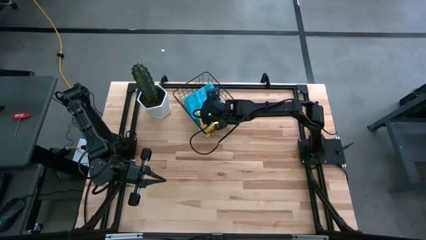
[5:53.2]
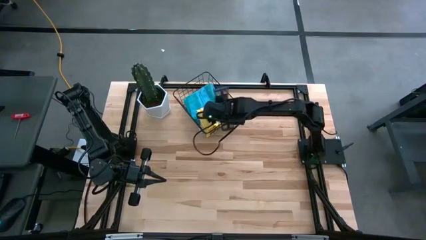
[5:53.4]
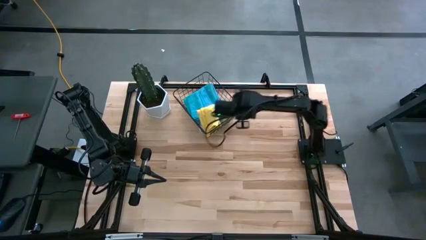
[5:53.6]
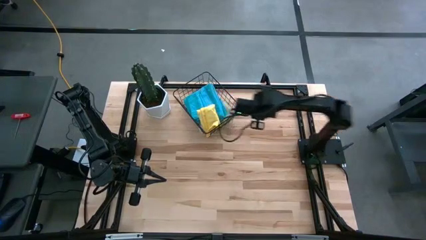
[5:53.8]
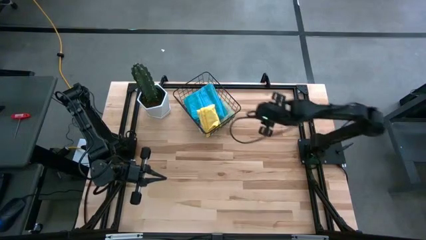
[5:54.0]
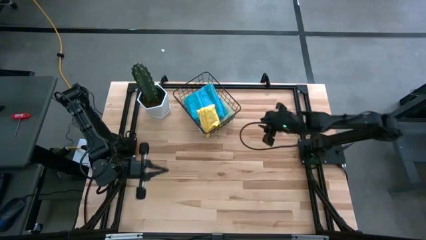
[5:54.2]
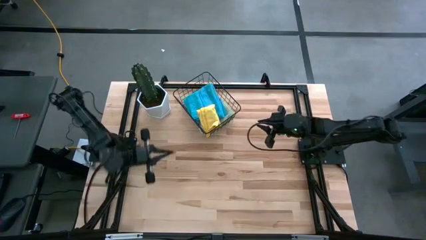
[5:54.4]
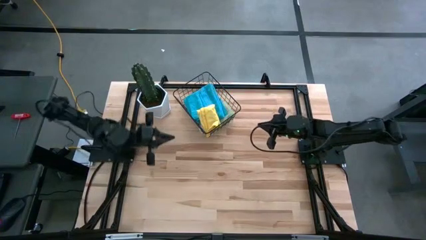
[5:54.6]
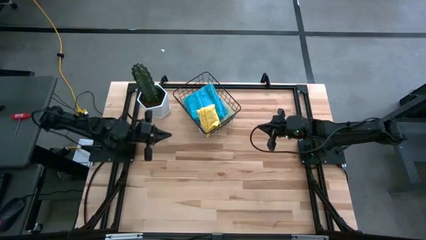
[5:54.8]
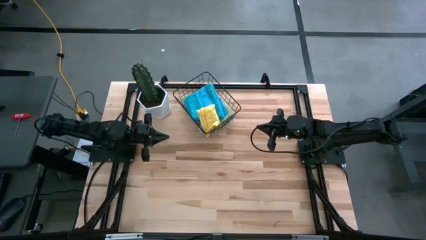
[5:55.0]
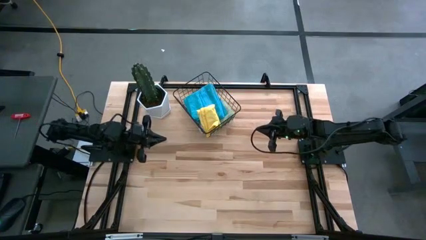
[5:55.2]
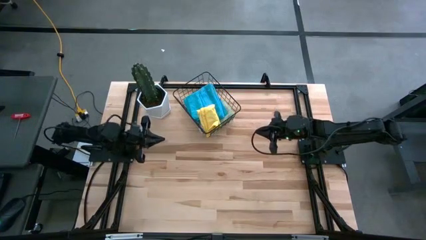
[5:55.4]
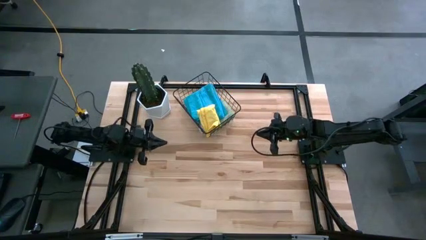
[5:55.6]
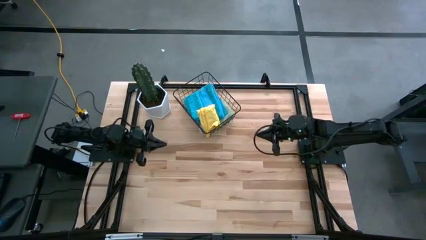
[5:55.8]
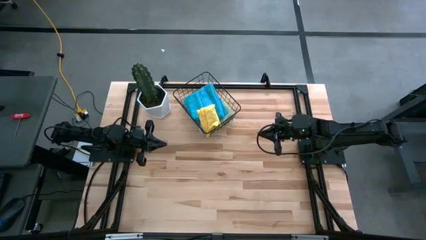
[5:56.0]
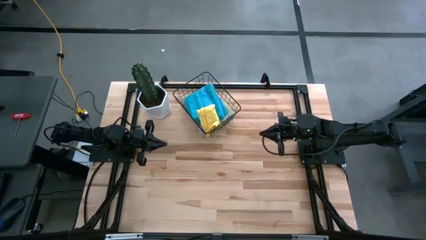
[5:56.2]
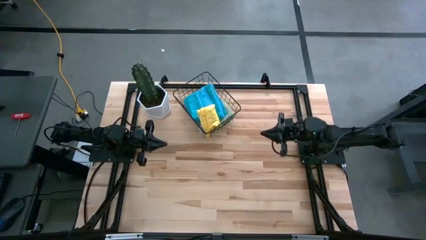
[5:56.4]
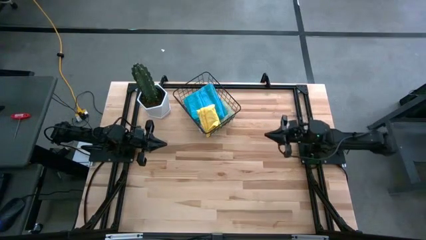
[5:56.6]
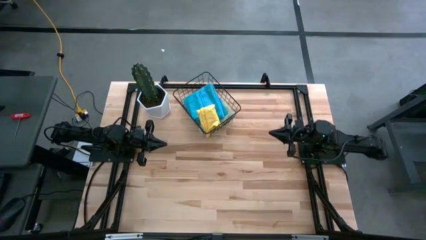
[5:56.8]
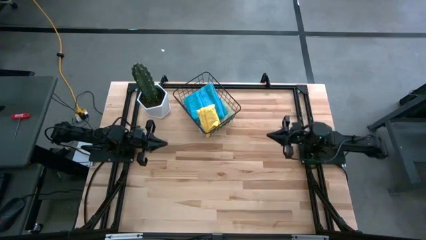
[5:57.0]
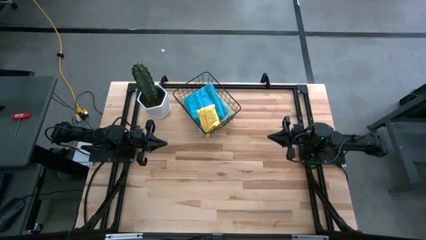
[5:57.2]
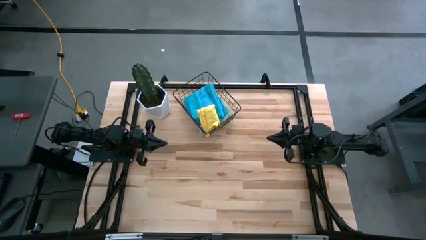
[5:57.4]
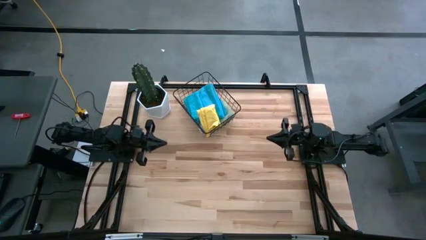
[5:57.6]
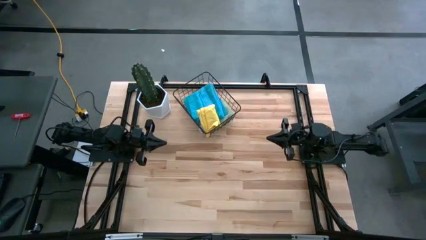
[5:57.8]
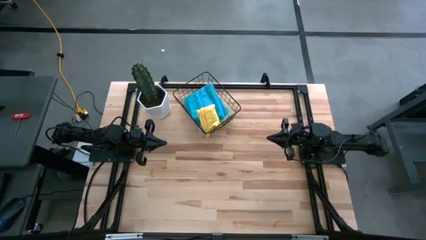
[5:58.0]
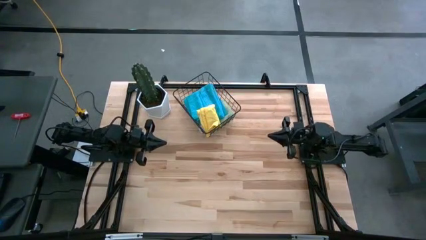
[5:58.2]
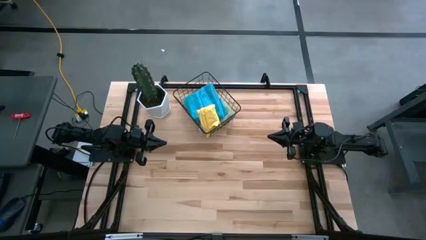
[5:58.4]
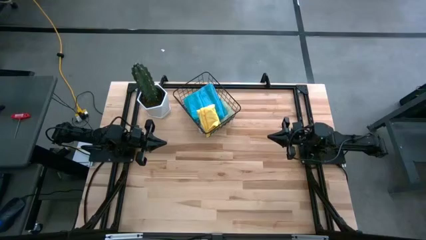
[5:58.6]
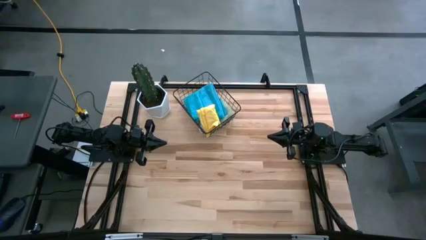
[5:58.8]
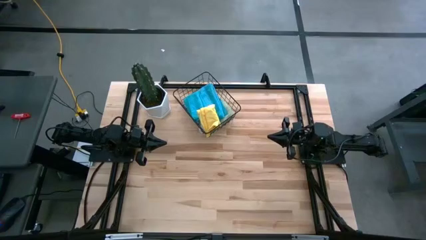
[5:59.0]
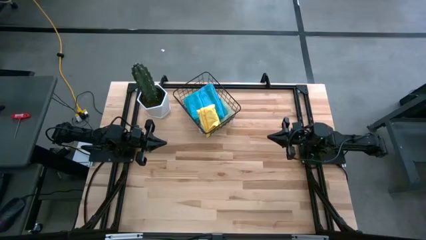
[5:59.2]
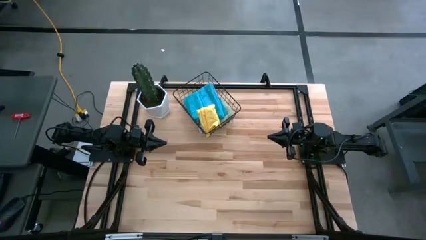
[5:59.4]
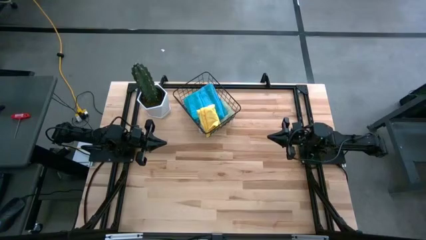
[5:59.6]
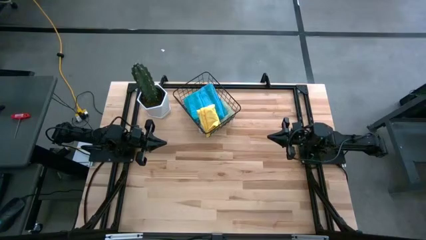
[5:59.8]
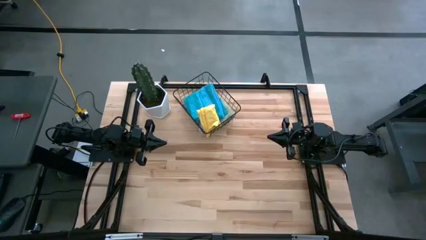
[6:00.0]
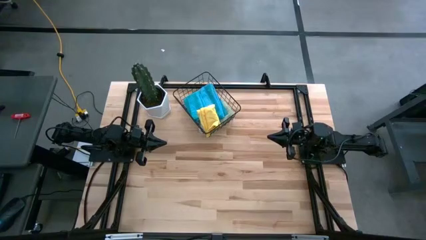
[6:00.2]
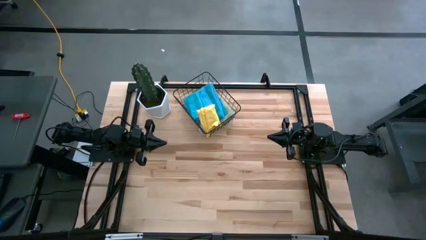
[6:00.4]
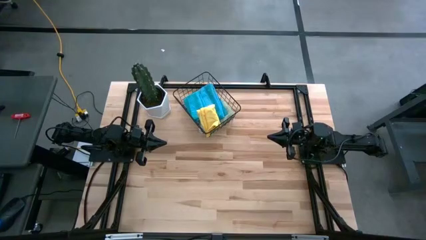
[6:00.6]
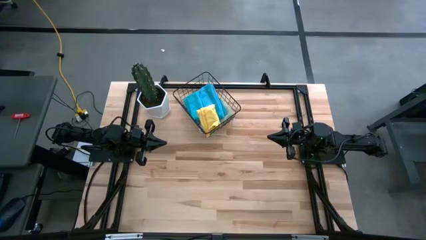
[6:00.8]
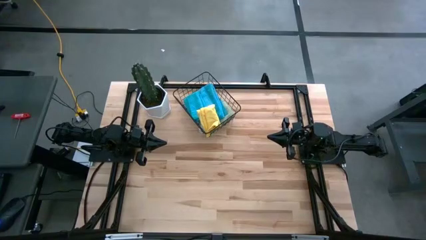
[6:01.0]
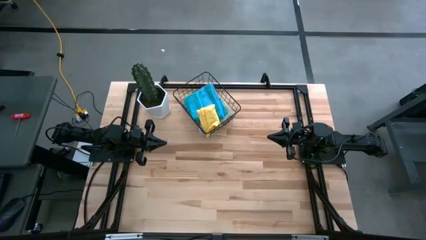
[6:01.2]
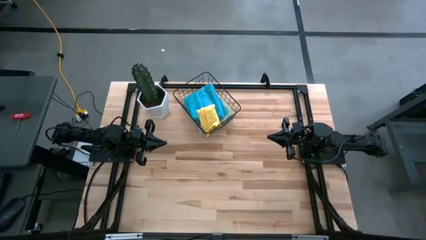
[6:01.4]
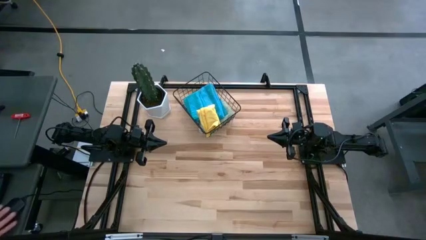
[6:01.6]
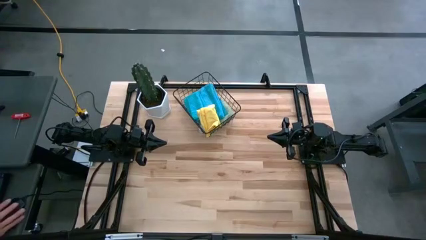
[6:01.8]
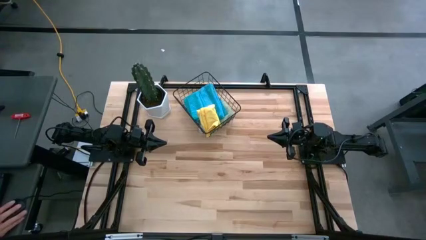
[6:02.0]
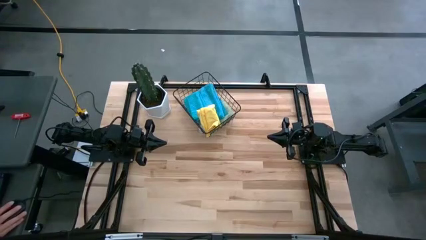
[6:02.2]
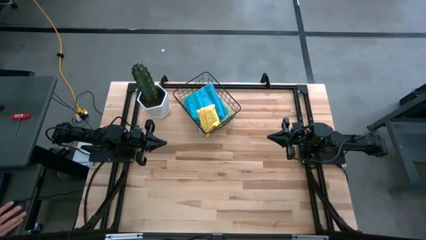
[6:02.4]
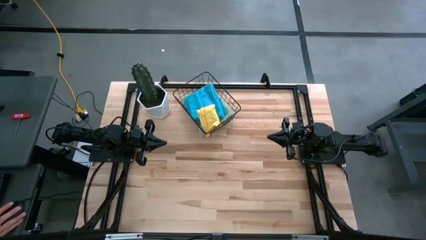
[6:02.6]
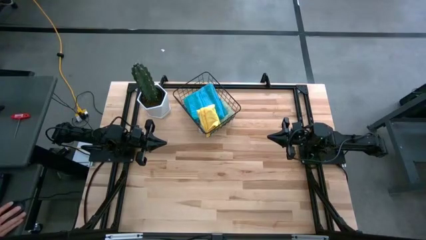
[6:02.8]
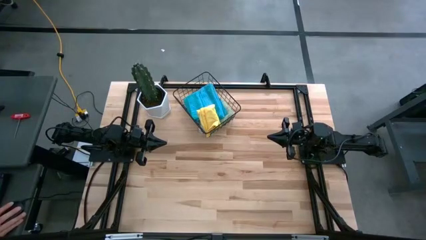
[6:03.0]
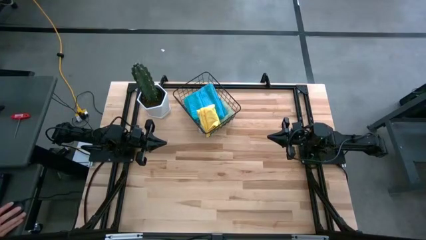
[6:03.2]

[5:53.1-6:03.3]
Task: Fold microfiber towels
Return to Home Position

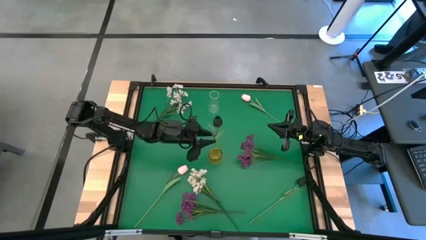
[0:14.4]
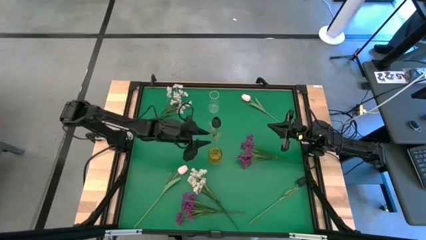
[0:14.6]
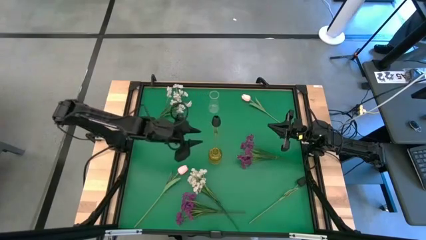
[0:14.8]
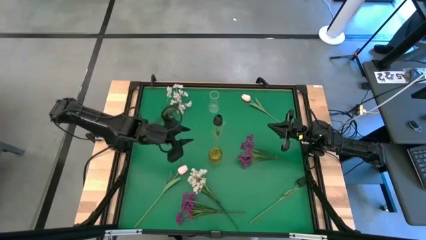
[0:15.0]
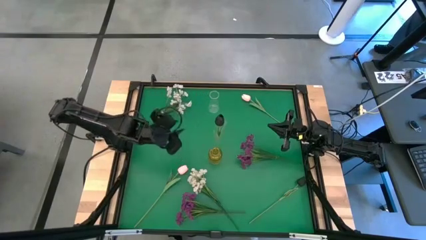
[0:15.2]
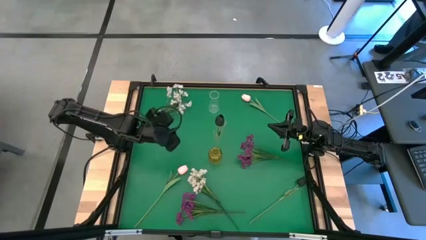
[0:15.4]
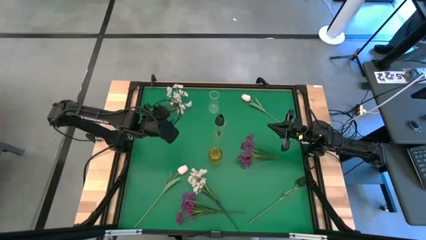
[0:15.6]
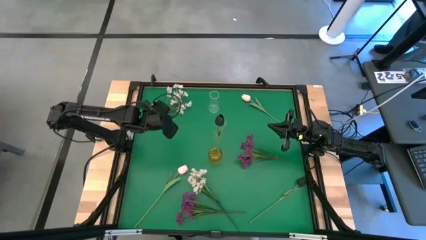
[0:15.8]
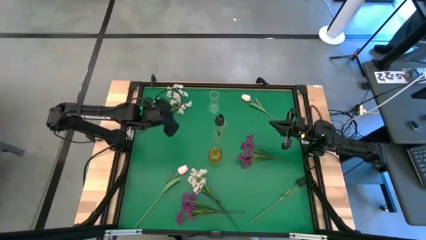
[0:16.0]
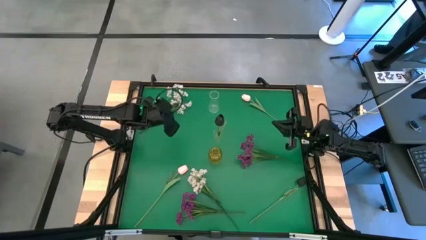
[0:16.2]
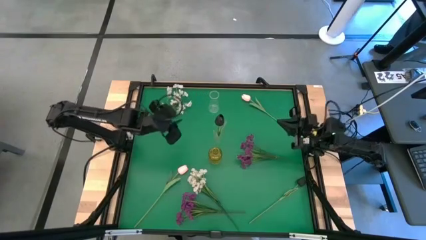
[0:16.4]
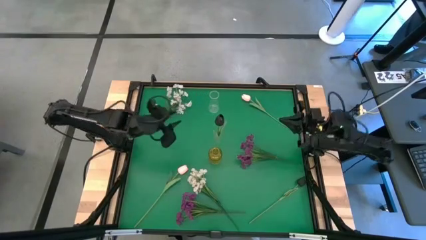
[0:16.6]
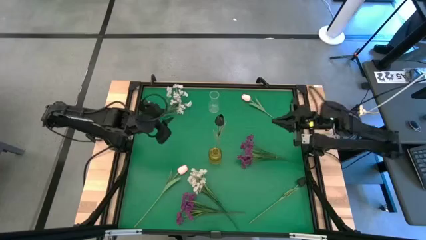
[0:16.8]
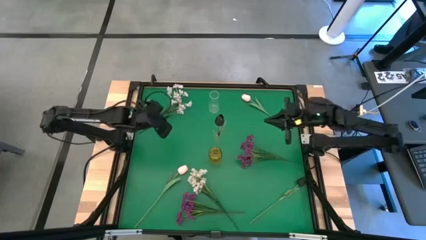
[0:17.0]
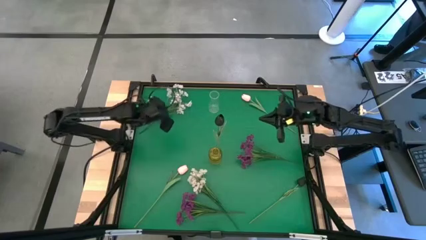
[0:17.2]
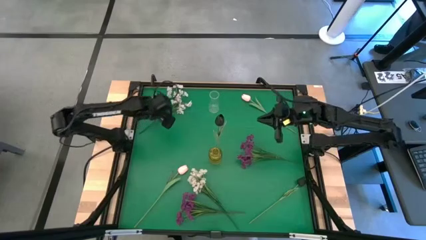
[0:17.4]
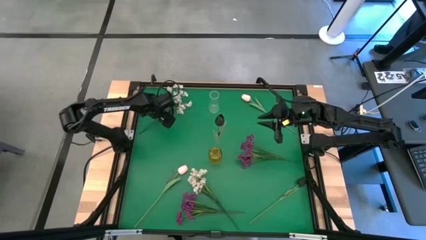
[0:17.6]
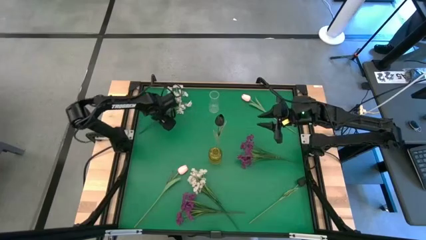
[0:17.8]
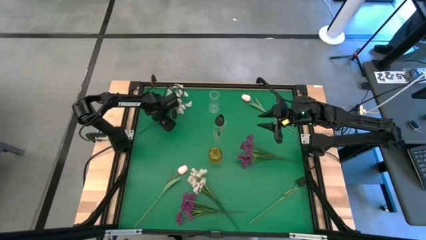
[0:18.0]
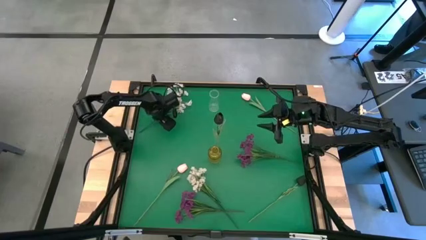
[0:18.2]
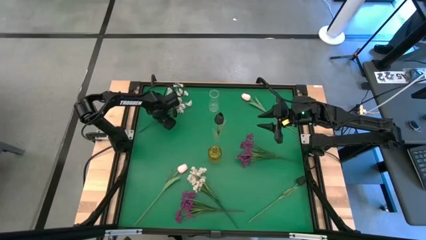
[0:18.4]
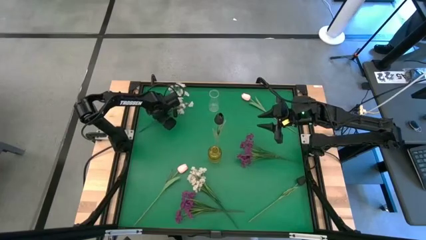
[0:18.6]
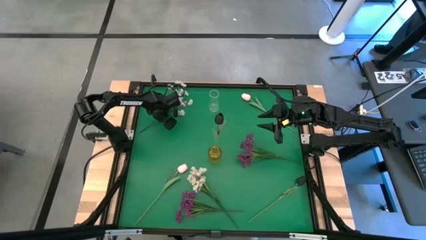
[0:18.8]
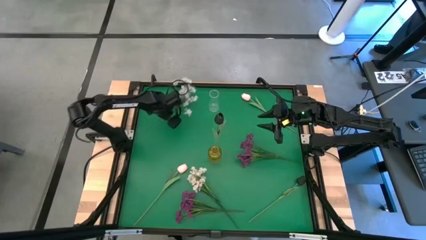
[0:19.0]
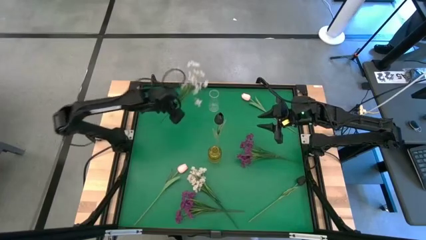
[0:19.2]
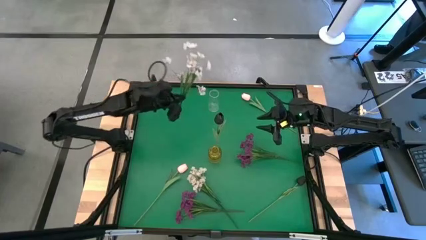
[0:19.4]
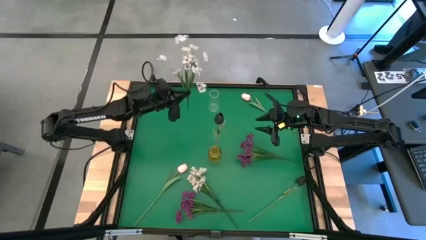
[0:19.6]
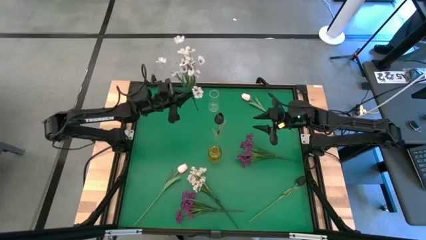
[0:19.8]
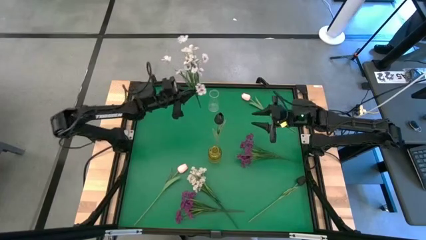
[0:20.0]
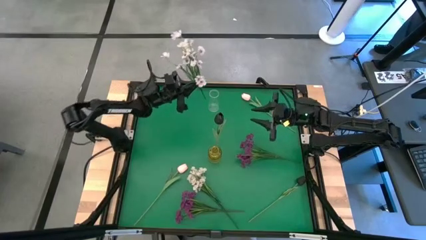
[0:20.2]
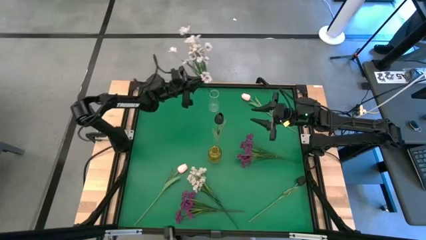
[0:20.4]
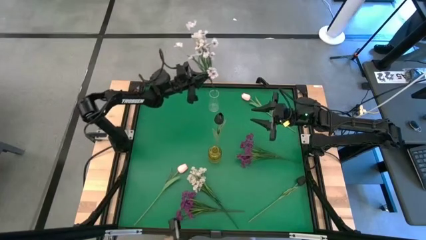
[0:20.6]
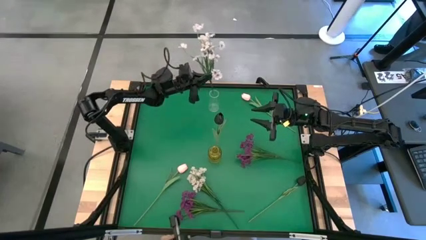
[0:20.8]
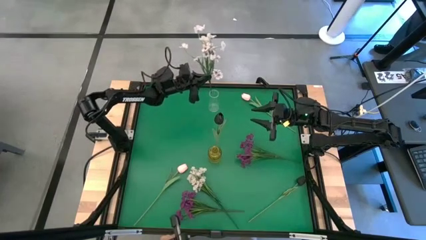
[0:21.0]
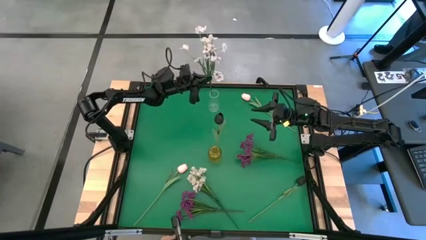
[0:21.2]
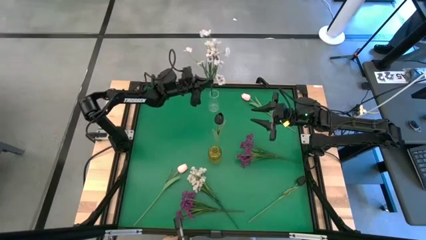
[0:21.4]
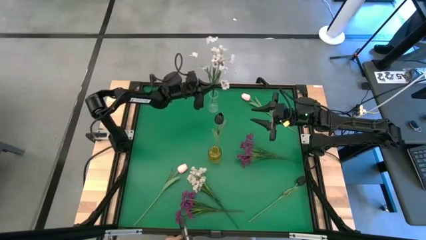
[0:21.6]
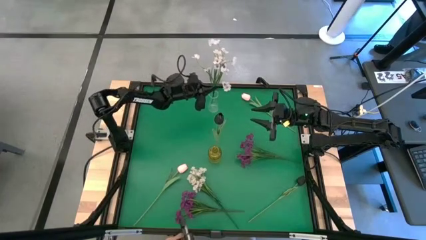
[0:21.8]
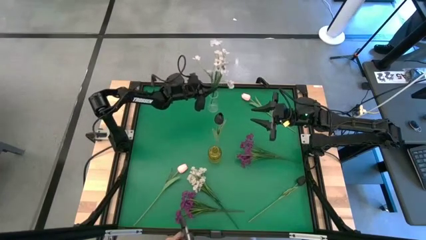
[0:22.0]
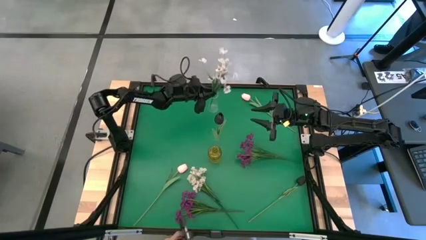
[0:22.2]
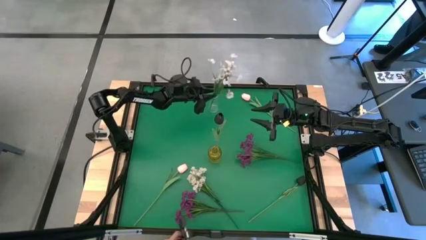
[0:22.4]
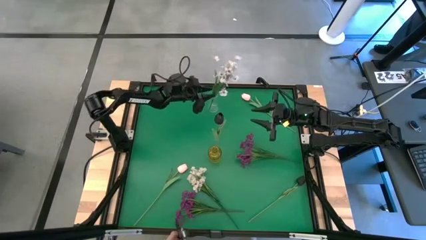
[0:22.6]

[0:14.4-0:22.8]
Task: Sort flowers into vase by color
Put the top white flower into the transparent vase
